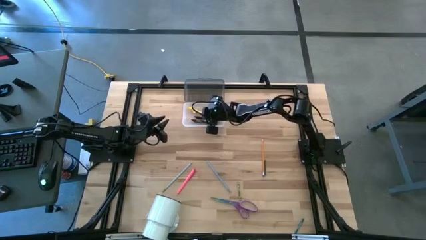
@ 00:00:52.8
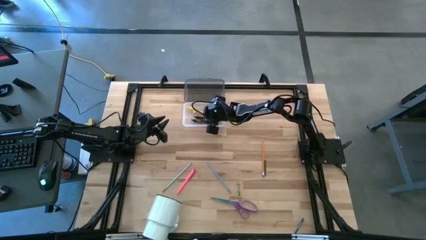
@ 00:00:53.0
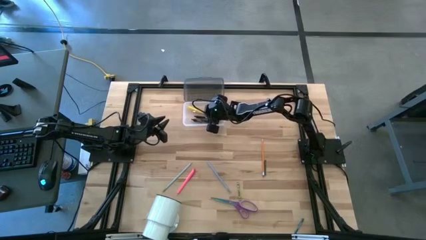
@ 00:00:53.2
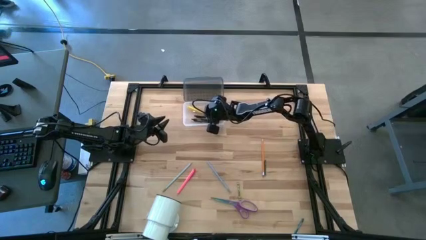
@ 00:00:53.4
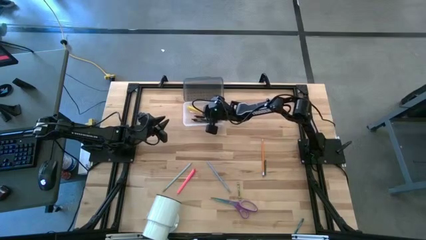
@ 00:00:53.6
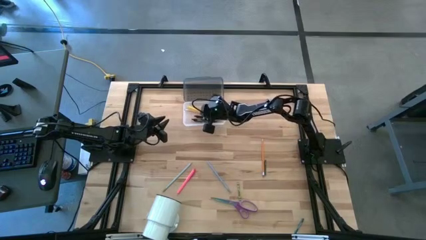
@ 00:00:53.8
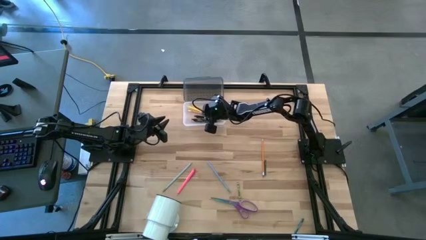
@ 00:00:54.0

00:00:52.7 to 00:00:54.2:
Task: Pick & place school supplies into a supply box
Adjust the orange pencil in the supply box

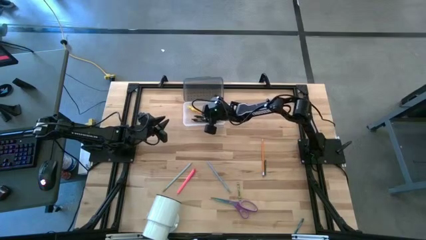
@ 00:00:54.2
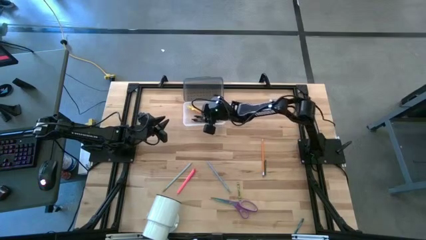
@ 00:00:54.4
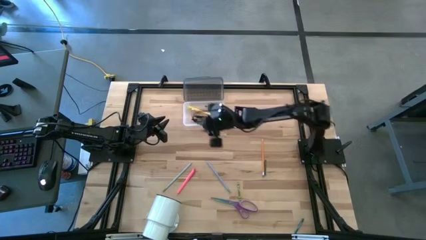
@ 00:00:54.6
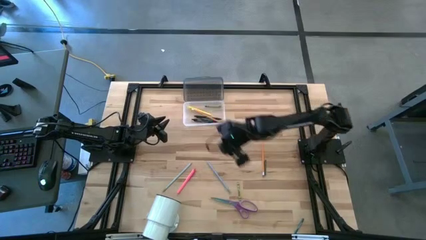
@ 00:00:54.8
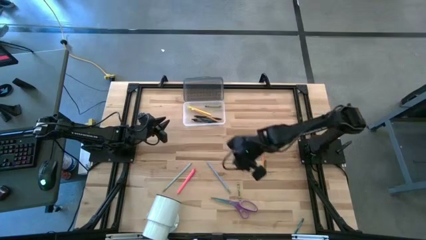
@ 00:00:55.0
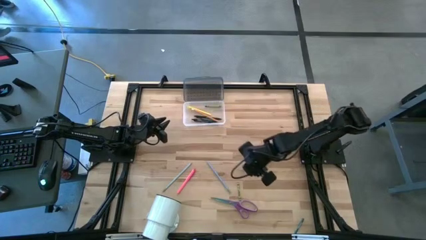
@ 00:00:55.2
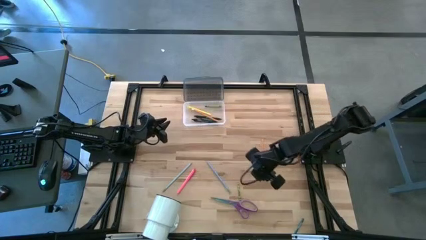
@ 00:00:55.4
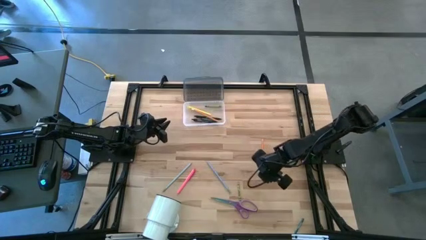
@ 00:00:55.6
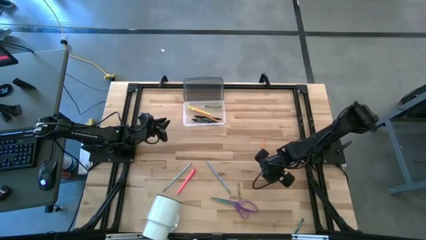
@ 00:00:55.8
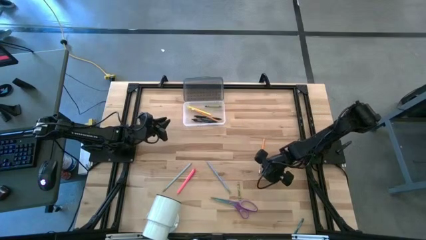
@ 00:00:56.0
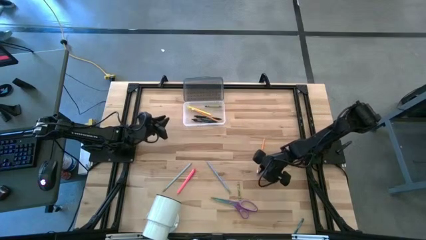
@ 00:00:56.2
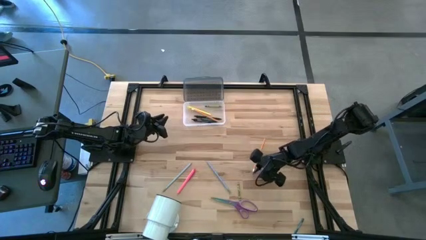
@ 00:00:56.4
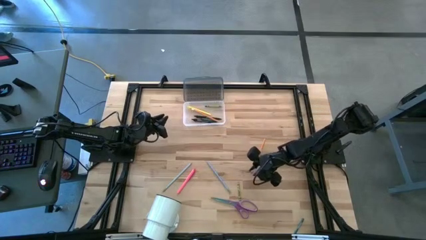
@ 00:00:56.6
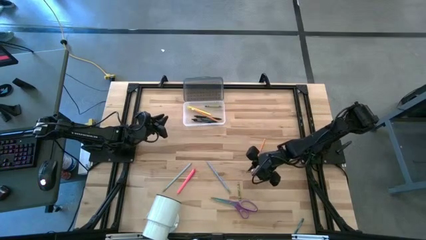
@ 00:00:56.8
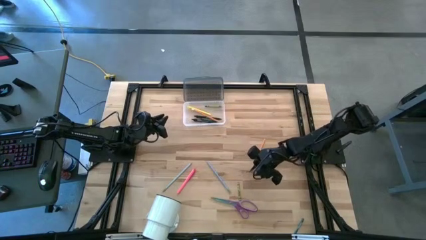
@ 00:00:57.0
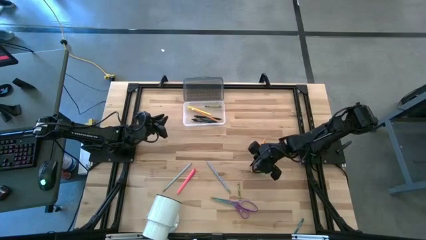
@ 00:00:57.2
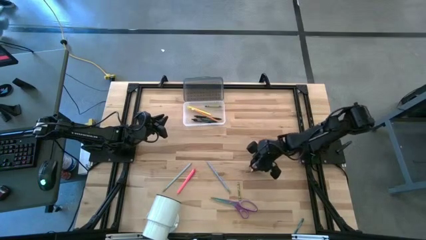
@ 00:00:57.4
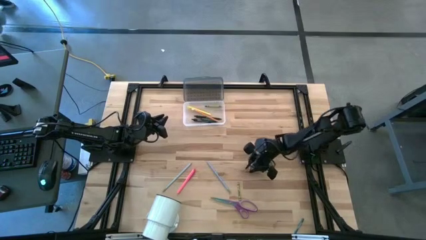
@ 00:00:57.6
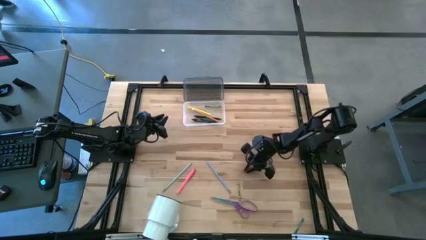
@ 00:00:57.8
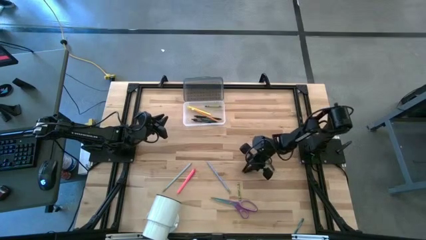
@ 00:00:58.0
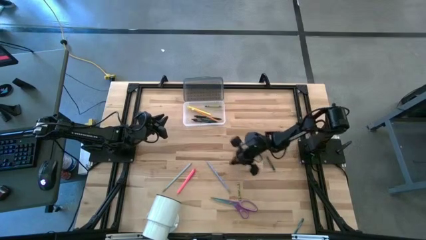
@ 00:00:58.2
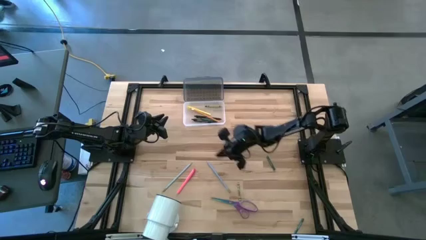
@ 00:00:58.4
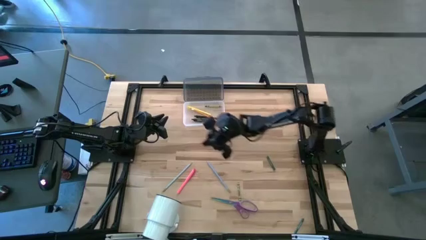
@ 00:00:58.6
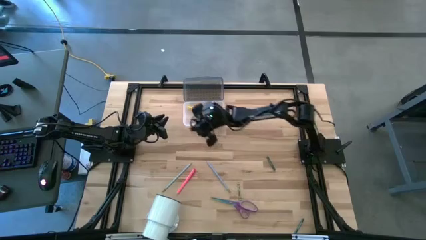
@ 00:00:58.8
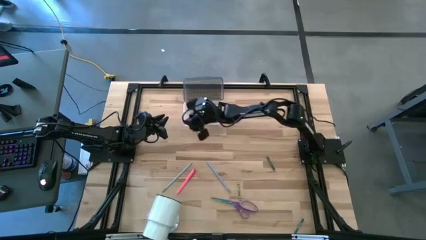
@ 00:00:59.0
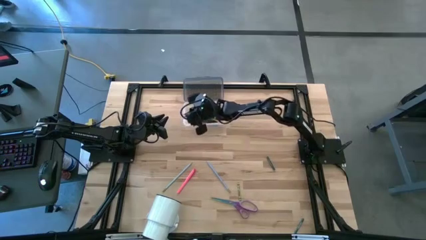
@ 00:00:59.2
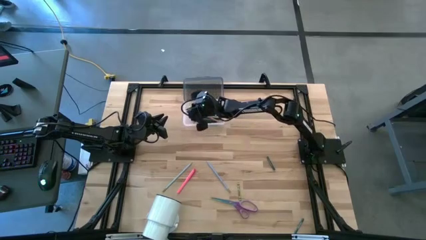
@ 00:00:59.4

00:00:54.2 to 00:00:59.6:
Put the orange pencil into the supply box

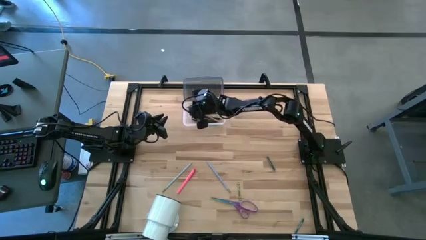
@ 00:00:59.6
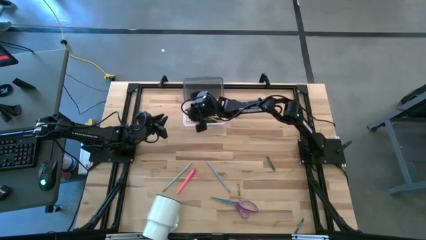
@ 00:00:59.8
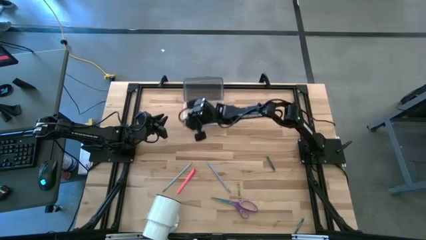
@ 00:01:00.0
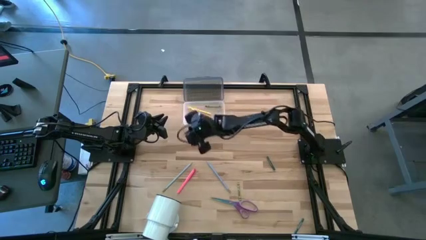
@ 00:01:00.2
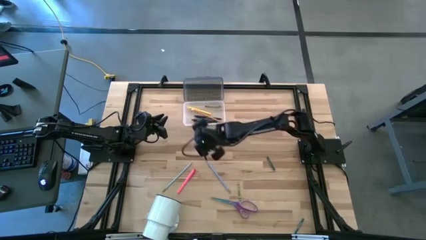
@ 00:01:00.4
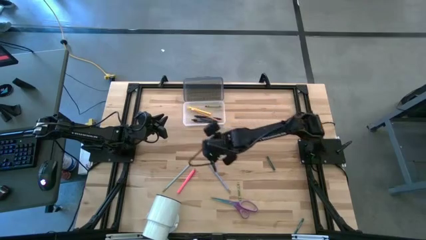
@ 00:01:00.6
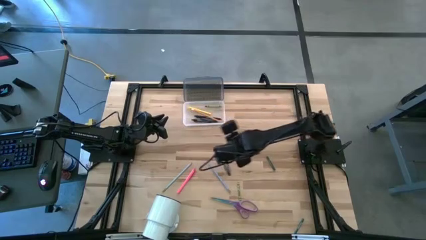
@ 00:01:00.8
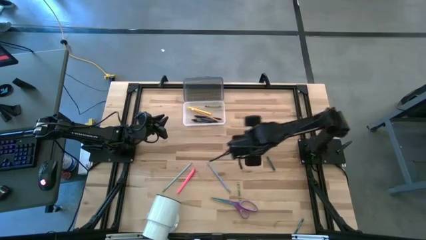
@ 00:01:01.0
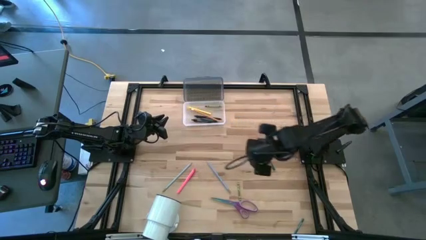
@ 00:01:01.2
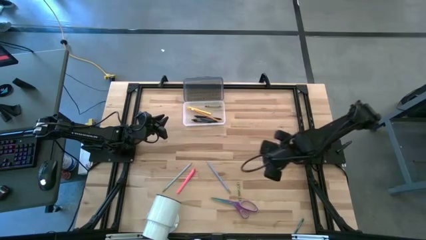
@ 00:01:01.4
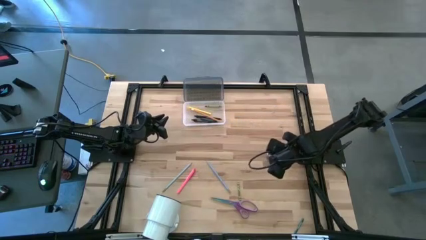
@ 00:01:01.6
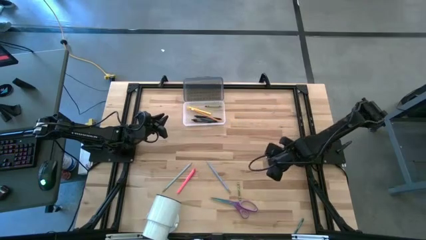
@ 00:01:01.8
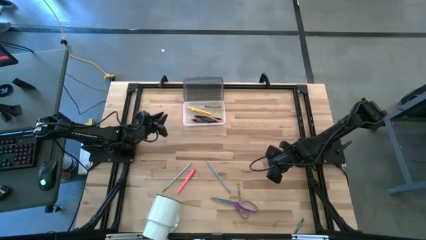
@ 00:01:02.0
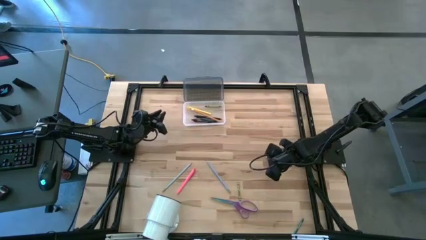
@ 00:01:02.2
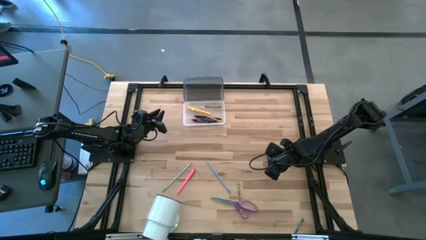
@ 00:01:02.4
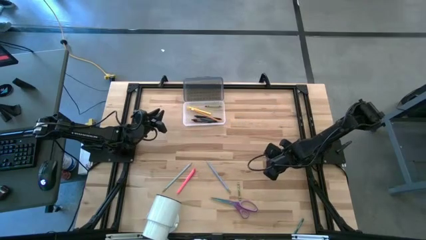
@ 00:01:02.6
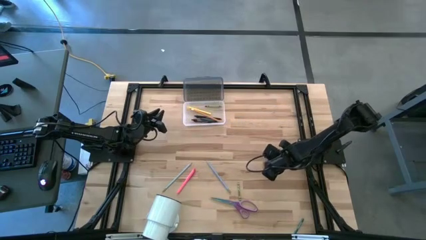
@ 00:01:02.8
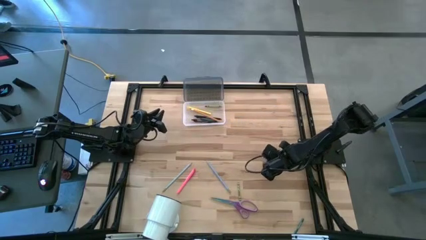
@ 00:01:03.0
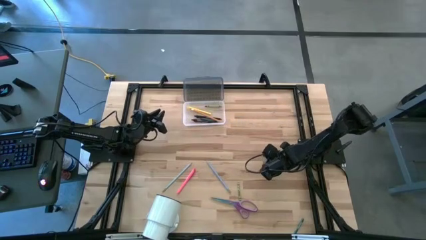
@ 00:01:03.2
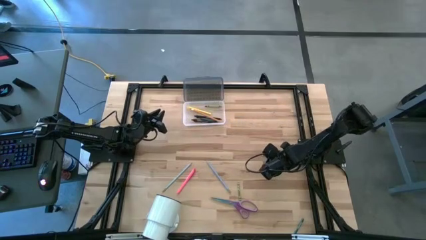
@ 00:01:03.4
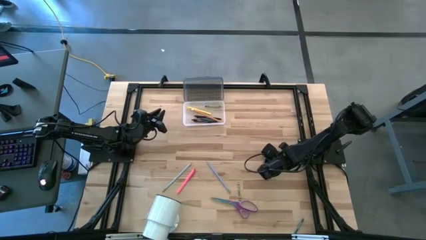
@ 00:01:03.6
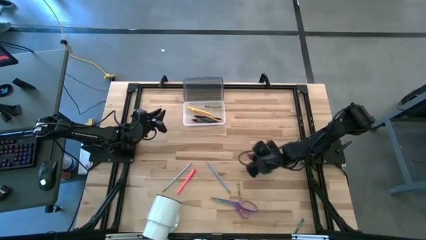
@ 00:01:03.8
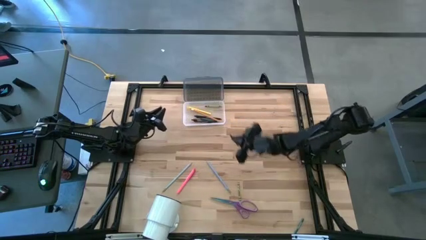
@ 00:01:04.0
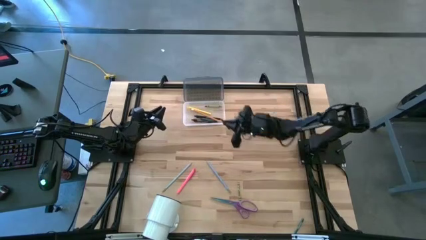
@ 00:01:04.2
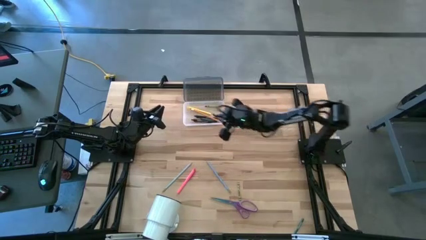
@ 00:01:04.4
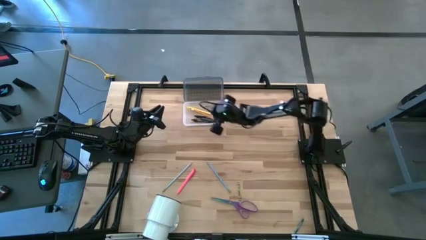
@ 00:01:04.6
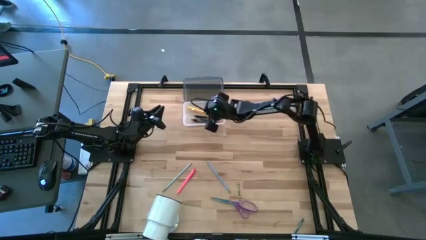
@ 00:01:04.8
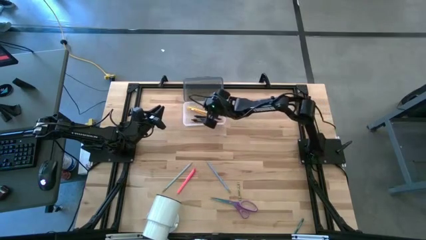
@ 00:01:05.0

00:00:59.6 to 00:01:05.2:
Put the top dark green crayon into the supply box

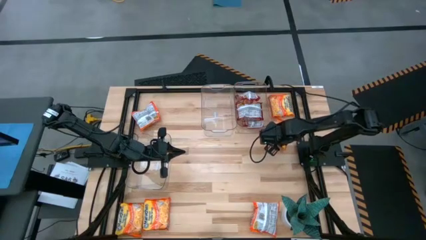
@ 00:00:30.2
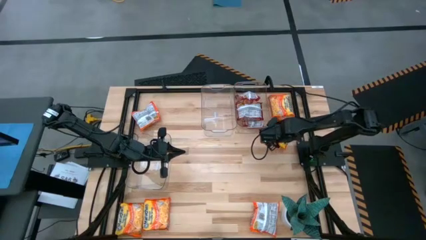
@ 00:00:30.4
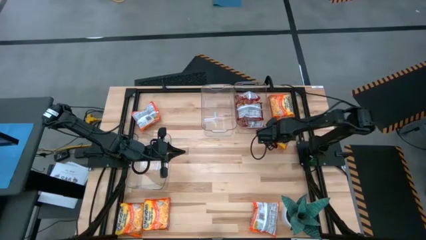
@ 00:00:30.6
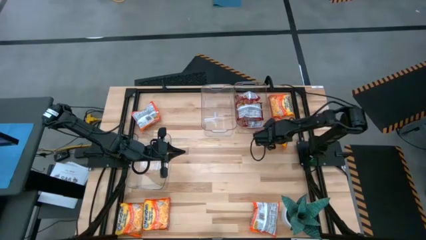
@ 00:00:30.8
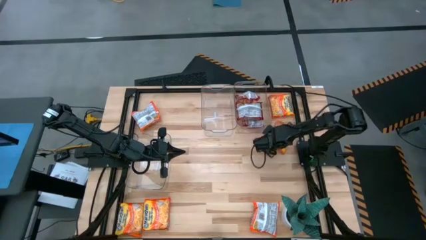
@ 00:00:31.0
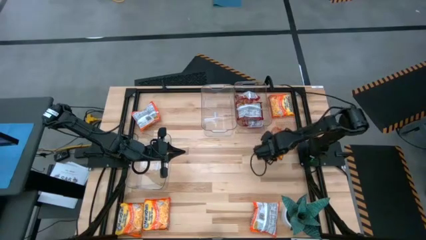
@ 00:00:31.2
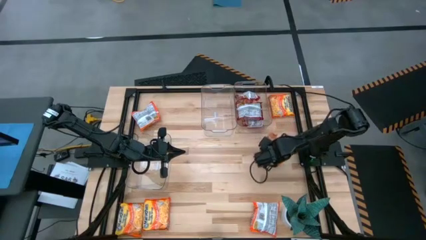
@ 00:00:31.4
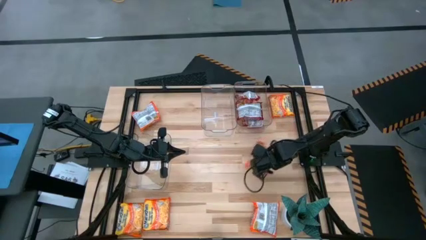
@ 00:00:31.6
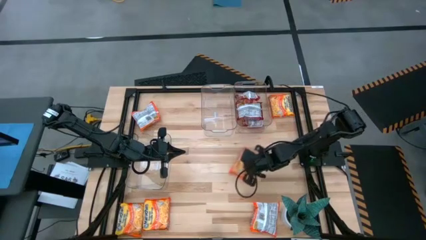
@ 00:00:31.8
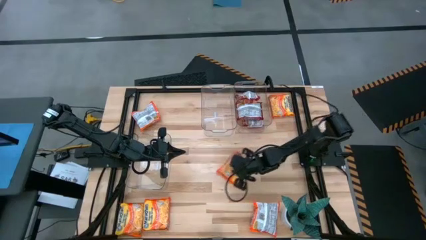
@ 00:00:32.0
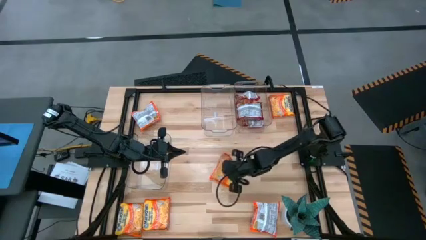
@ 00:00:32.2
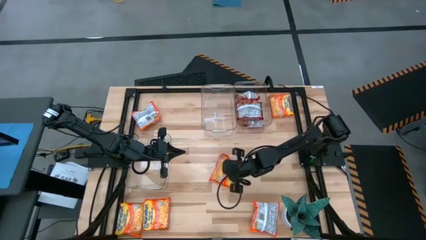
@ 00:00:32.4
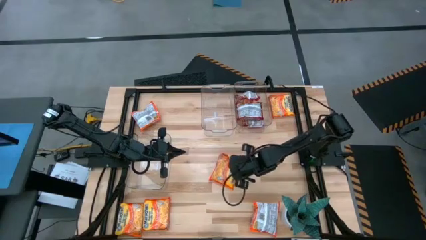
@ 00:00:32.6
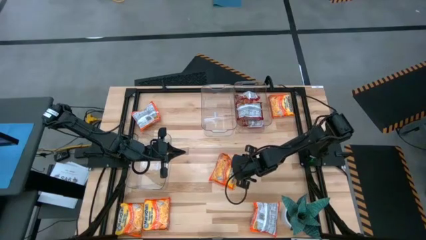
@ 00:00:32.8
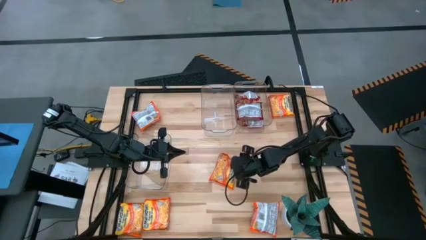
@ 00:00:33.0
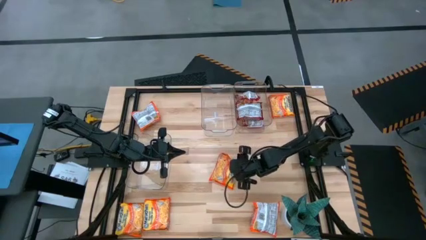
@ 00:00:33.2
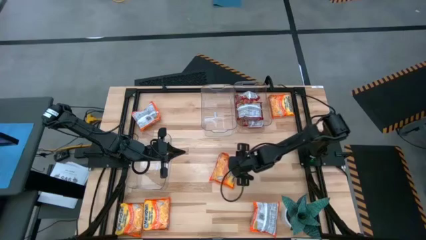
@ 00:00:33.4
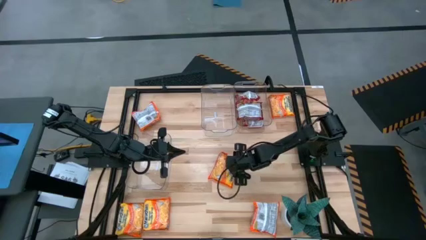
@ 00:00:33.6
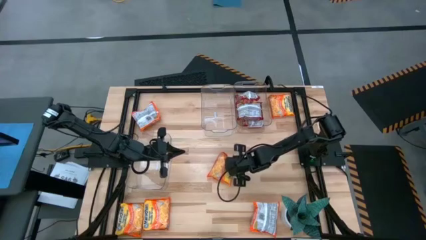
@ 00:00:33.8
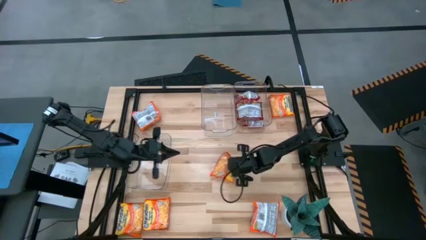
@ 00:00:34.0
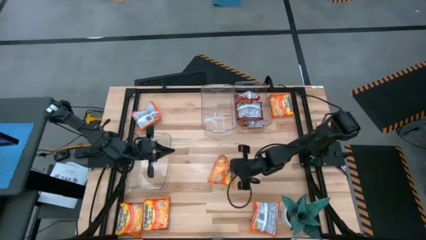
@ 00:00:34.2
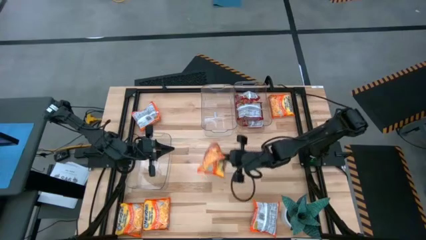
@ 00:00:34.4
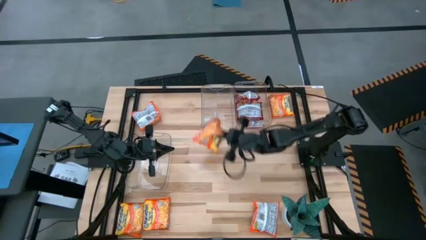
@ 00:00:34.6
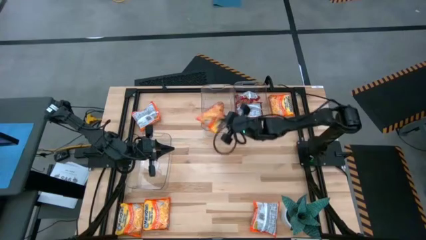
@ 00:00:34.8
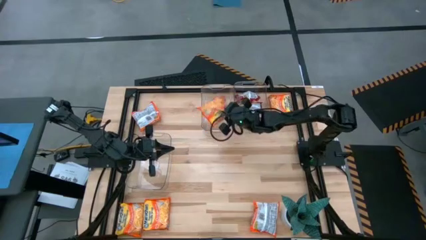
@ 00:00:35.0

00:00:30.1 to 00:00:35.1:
Task: Sort Maruchan noodles
Put the orange noodle pack into the top left transparent bin
